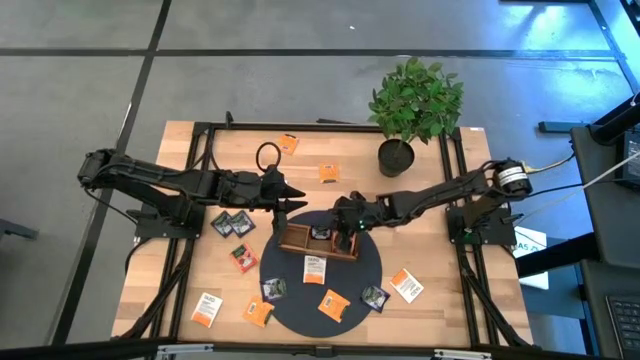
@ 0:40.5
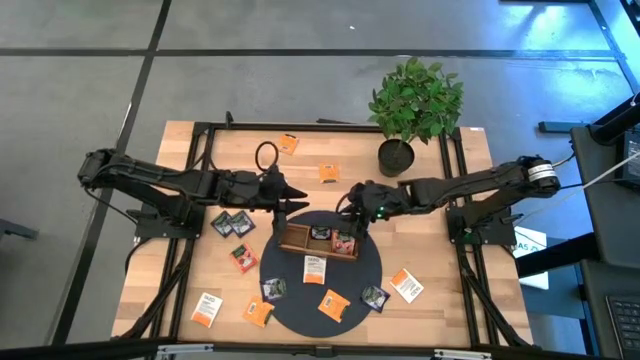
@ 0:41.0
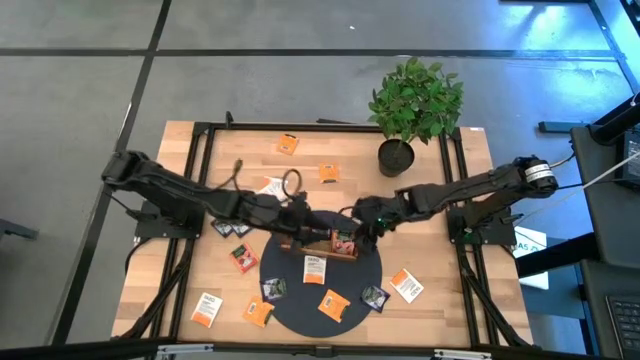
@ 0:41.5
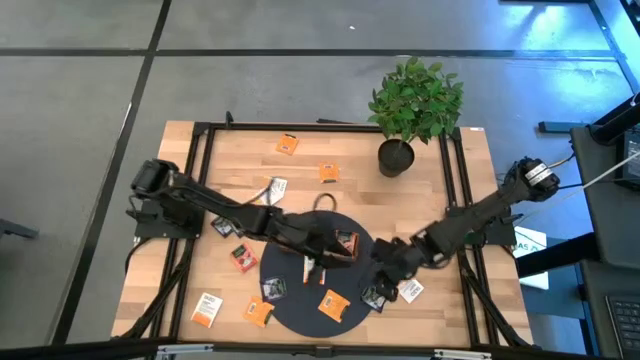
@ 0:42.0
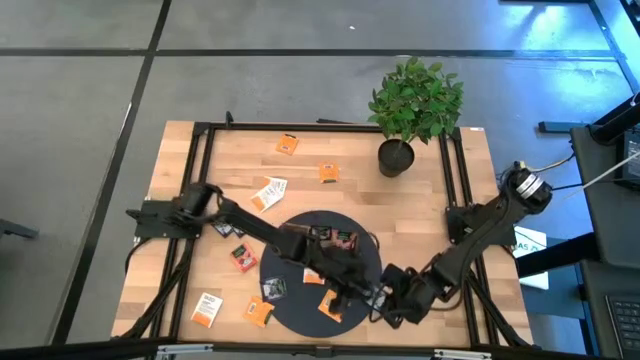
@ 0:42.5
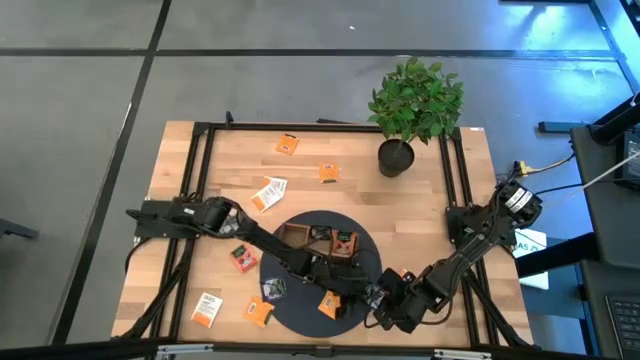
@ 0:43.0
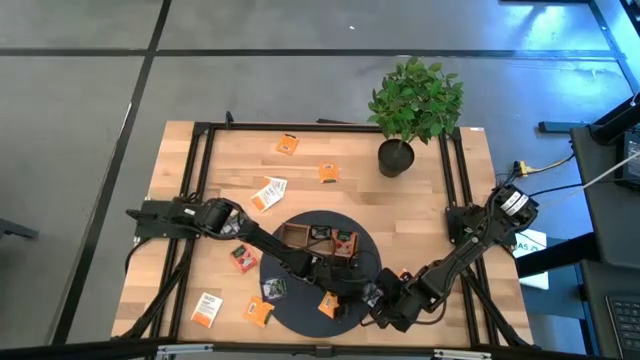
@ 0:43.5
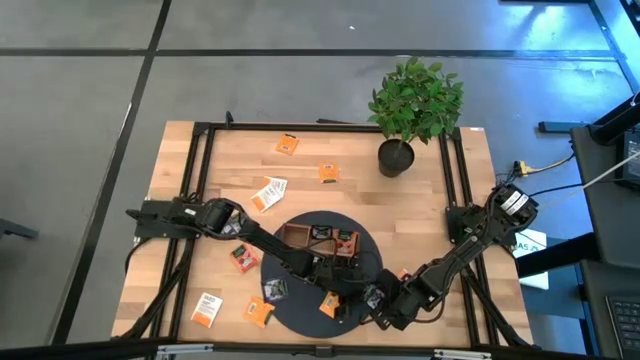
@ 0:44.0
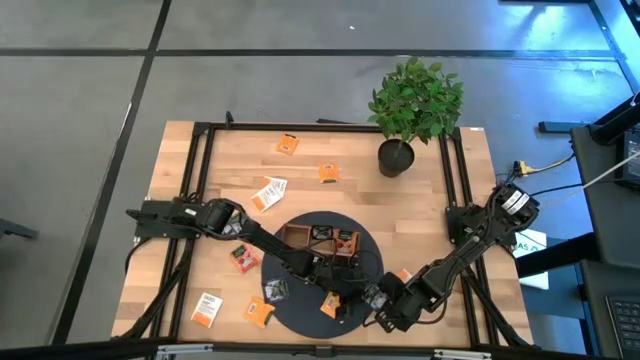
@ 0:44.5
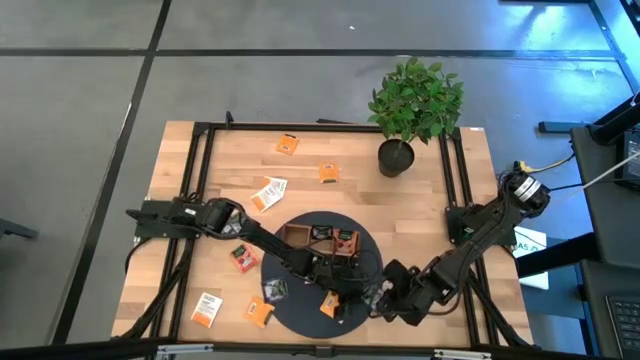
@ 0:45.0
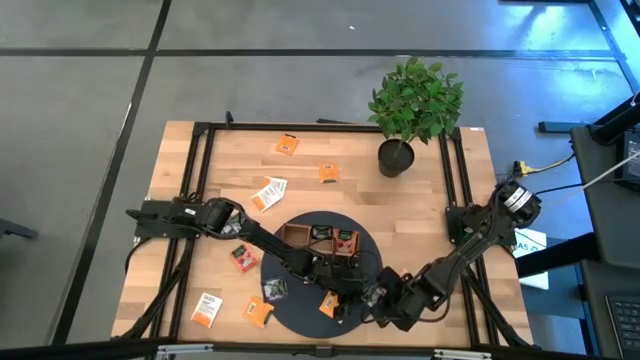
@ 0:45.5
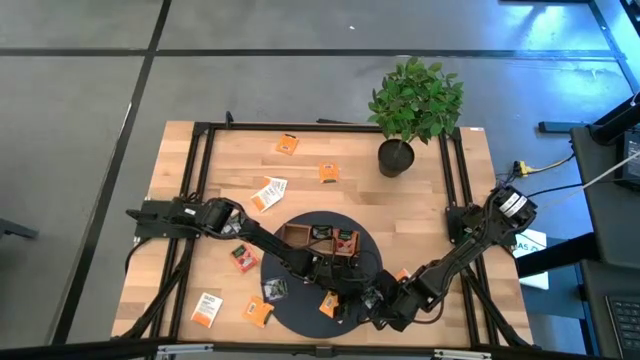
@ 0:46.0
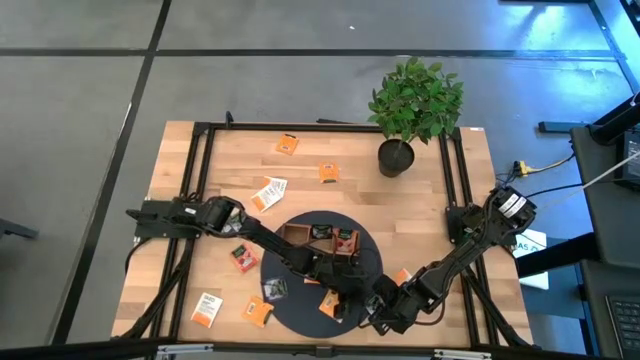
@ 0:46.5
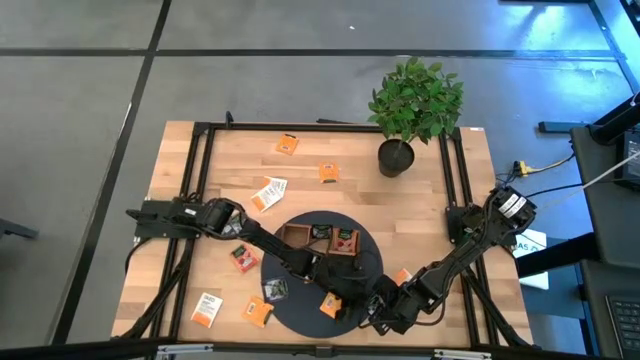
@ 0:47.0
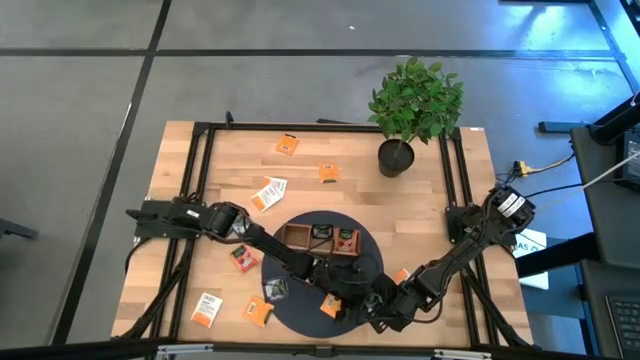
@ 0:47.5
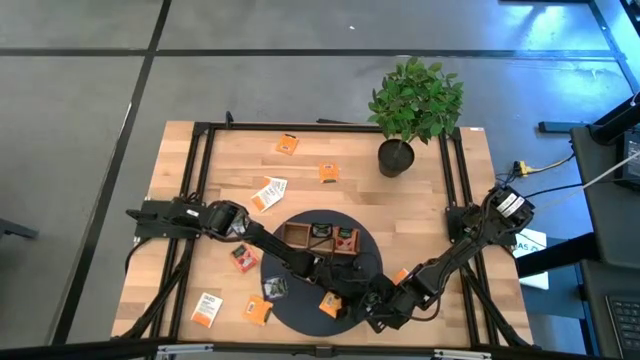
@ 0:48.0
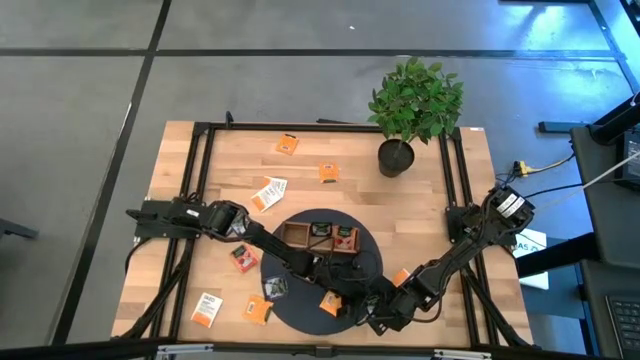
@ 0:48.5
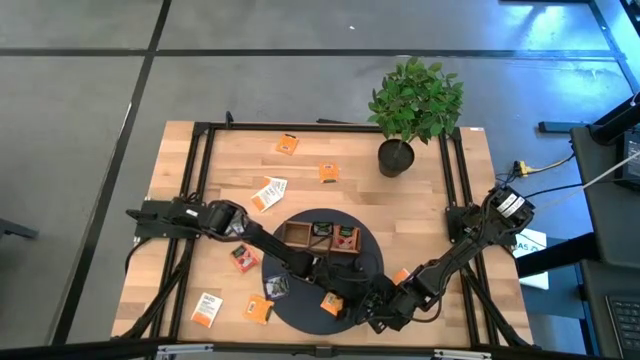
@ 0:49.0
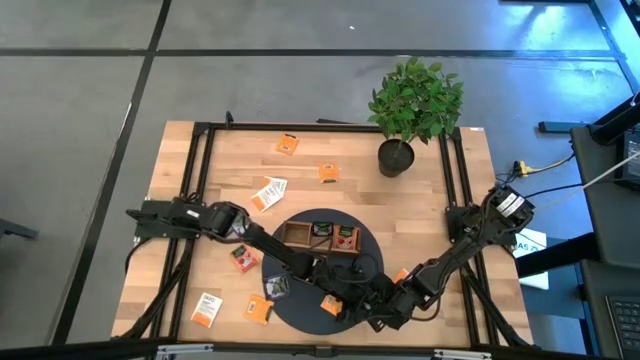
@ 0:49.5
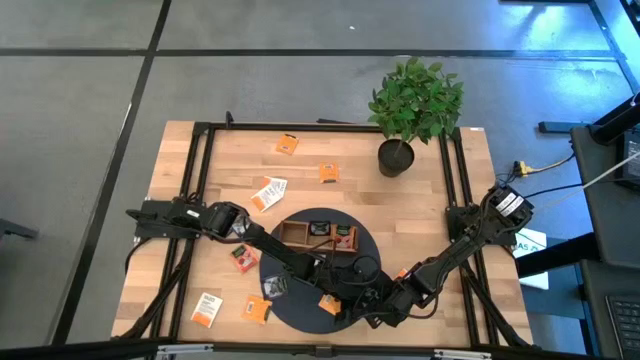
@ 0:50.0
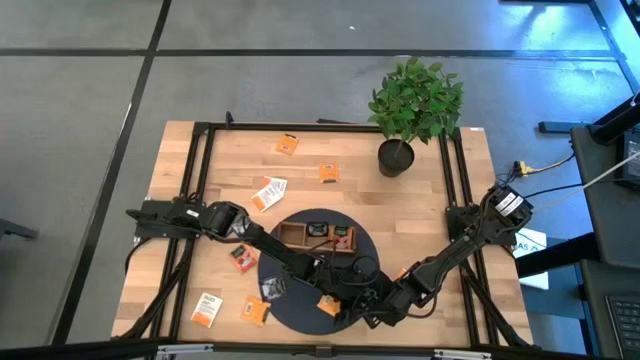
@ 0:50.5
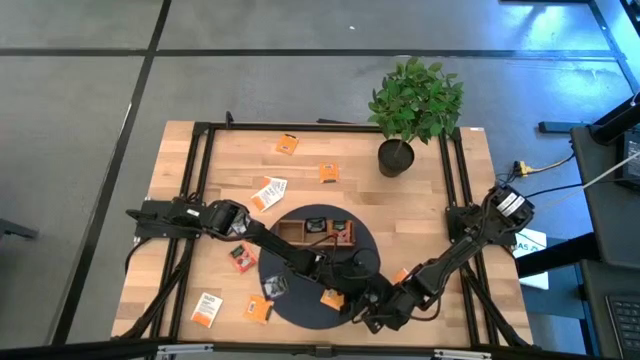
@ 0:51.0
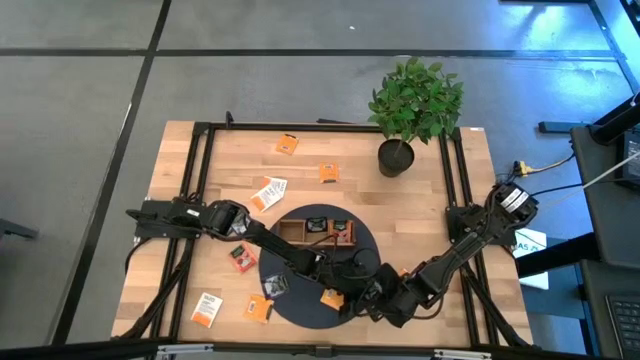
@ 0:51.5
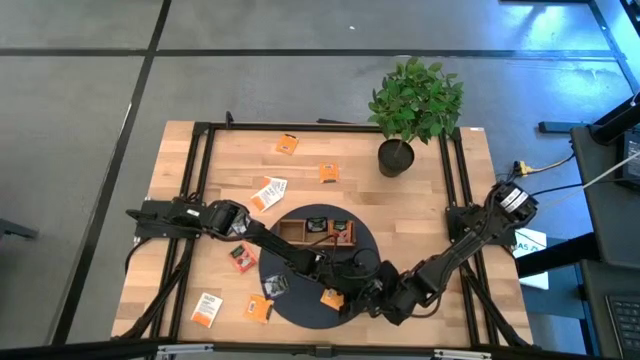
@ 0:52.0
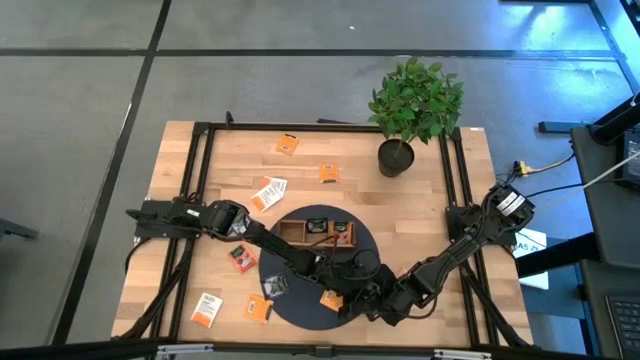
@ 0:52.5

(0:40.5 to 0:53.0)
Task: Pick & Place Tea
Put the black tea bag into the middle section of the wooden organizer

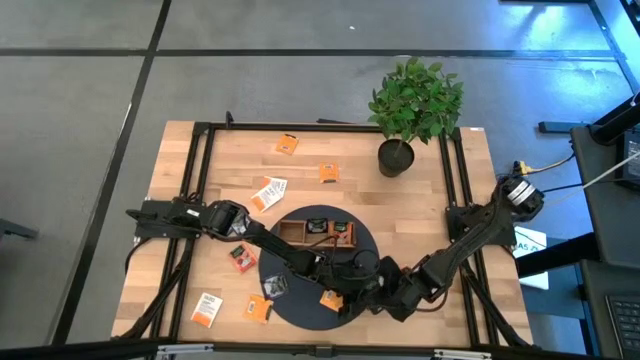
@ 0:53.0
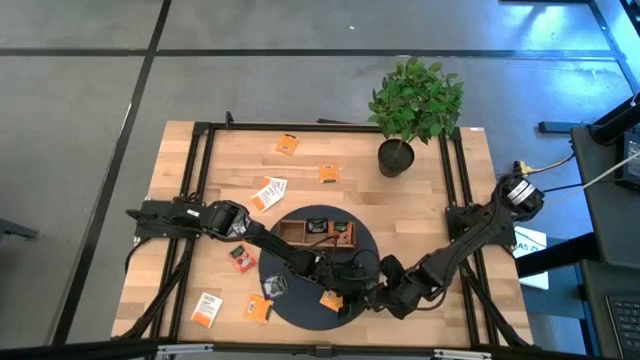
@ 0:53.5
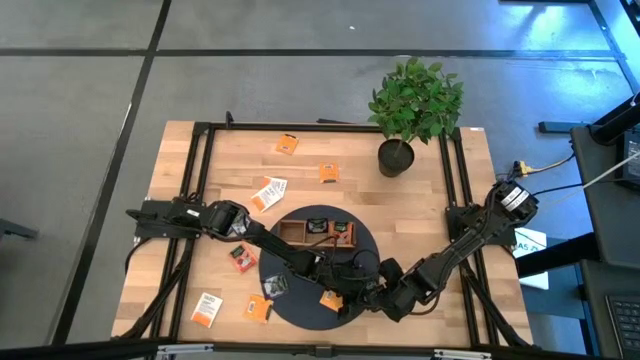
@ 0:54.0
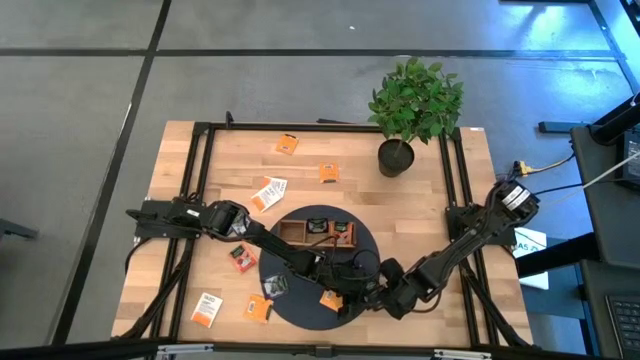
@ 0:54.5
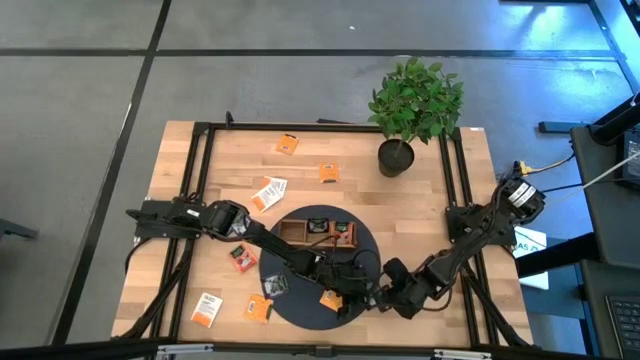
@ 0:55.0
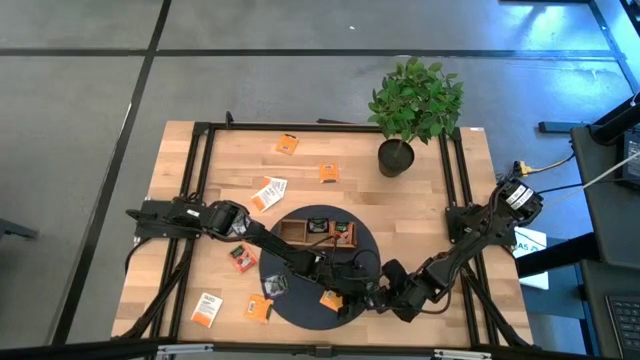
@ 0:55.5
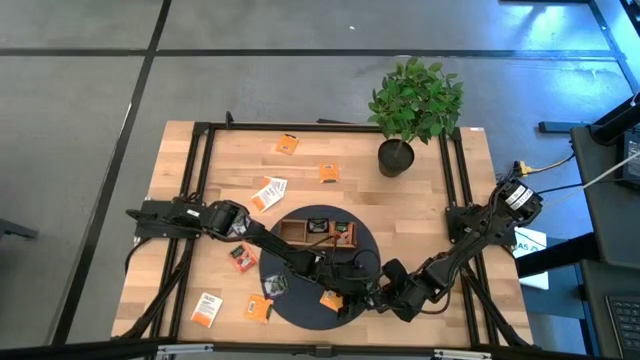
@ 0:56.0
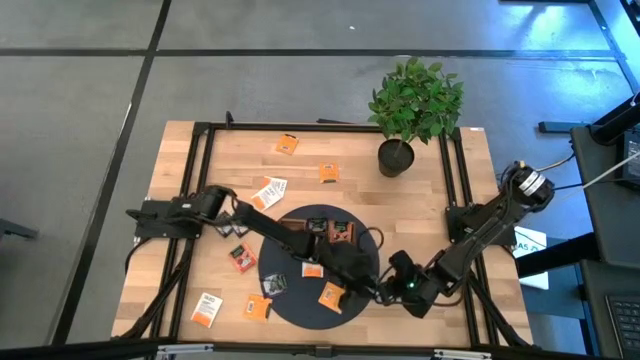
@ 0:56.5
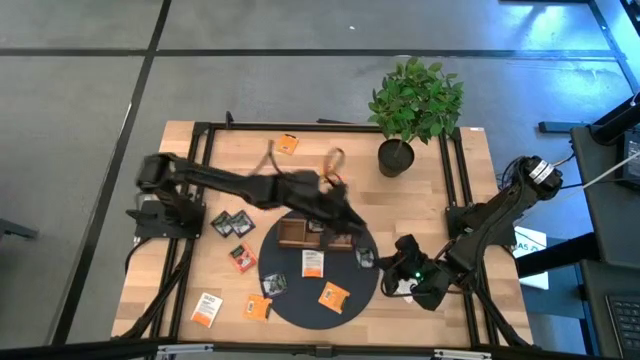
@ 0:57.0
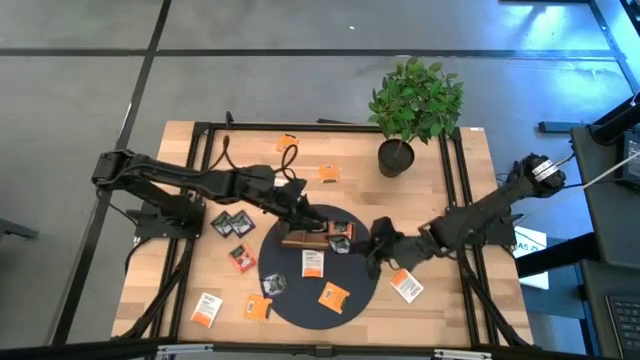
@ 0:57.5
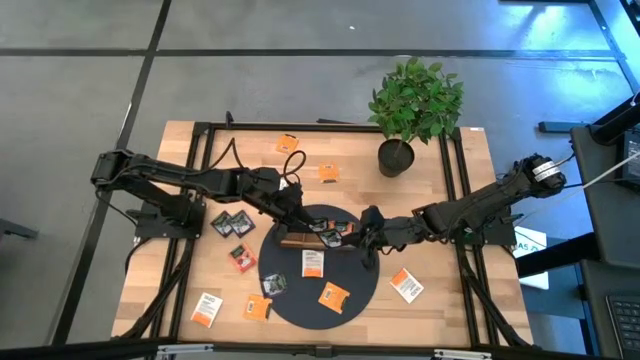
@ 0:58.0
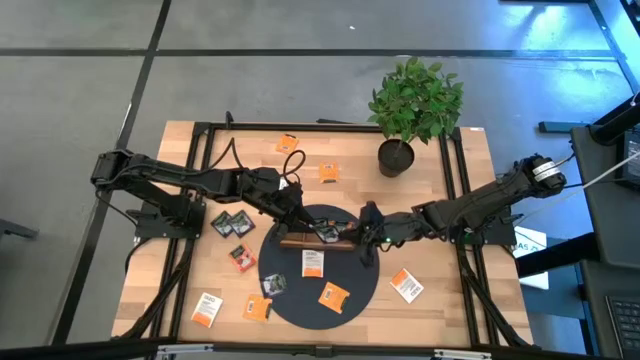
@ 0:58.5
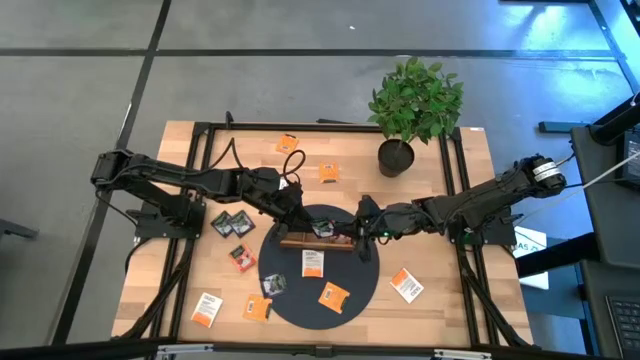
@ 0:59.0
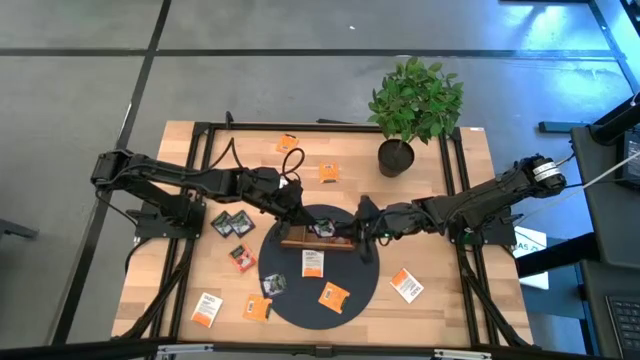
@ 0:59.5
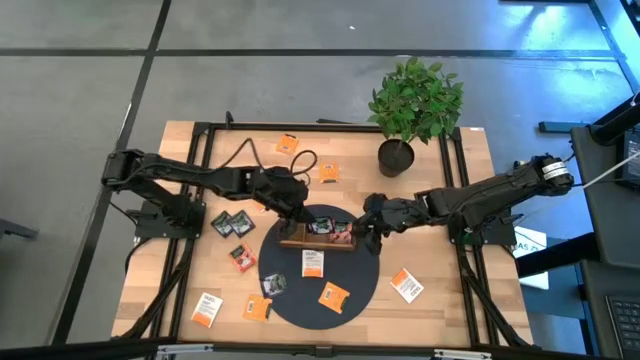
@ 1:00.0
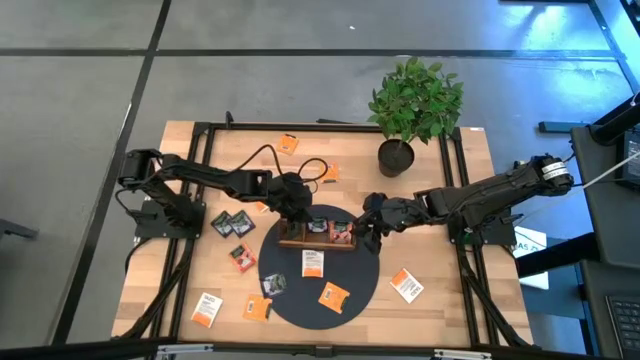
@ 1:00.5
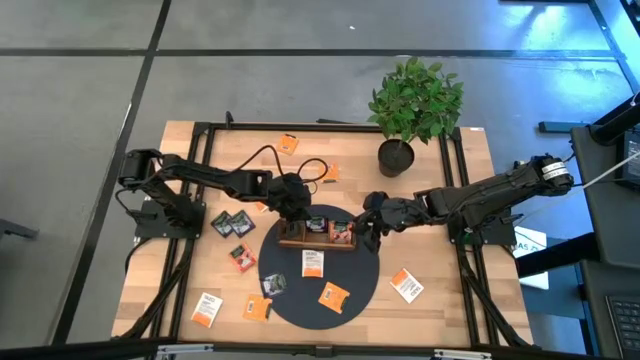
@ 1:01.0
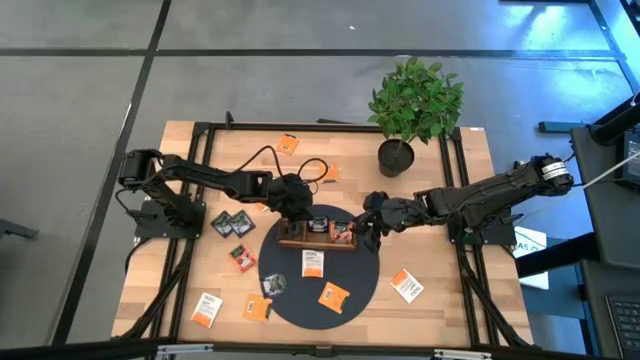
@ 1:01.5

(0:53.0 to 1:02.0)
Put the black tea bag into the middle section of the wooden organizer
